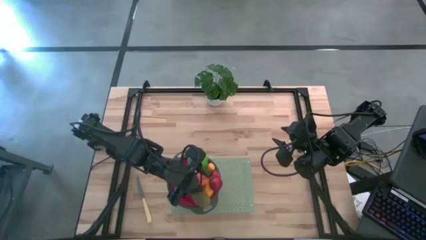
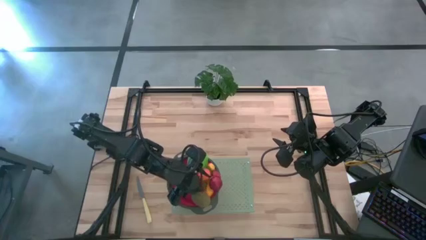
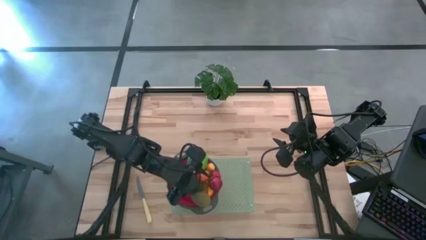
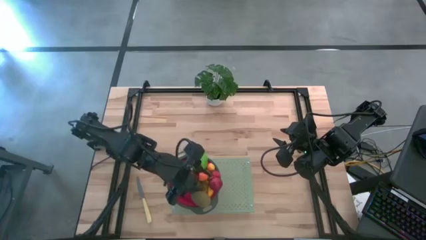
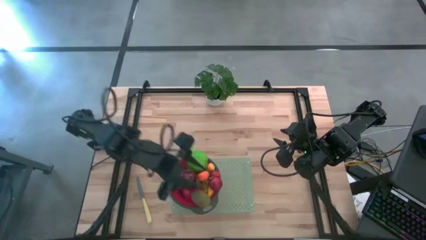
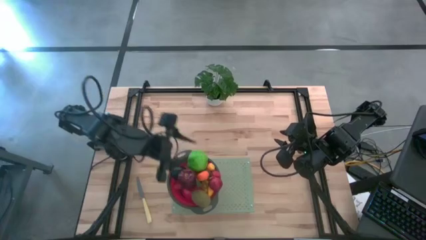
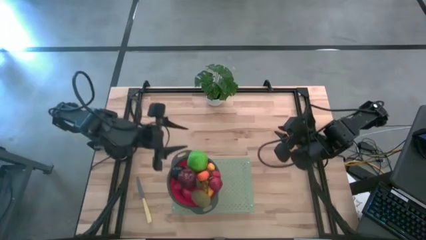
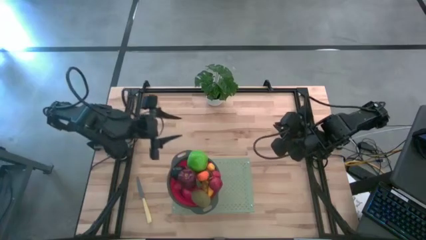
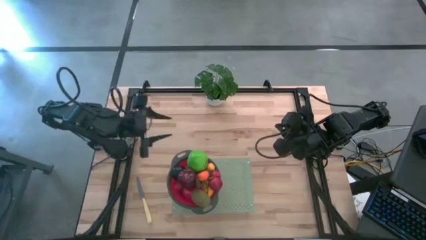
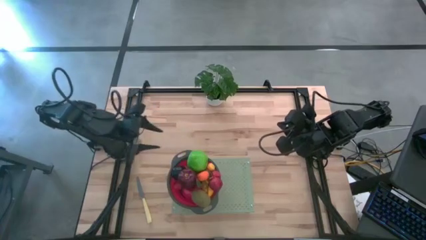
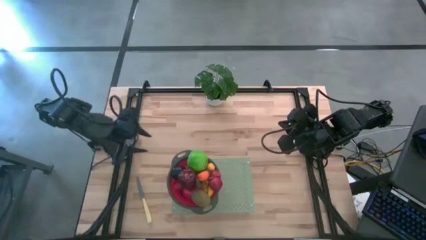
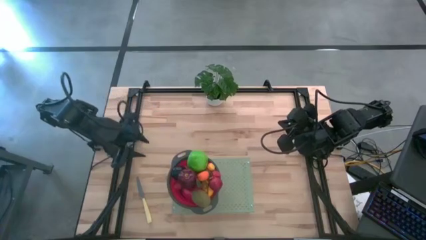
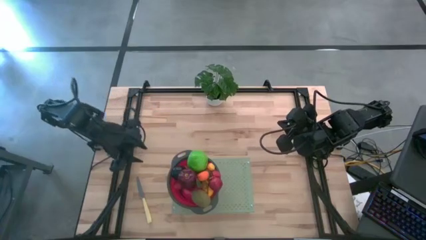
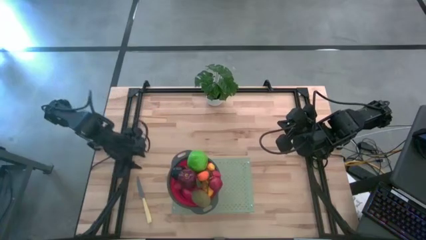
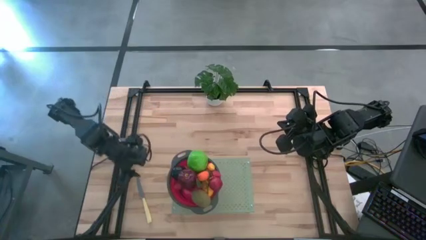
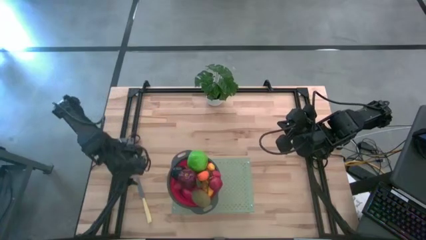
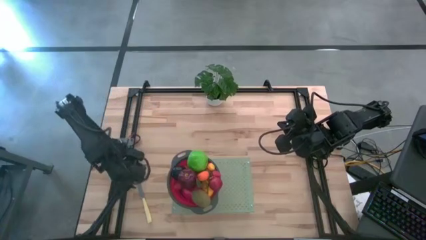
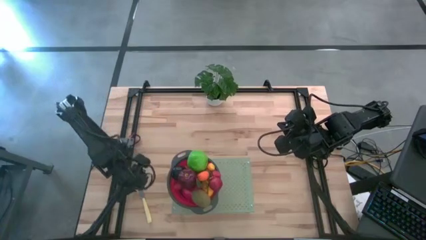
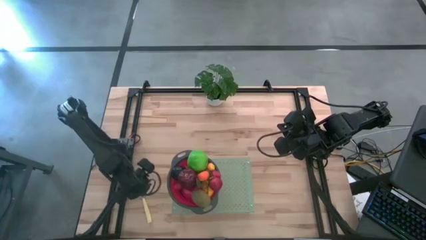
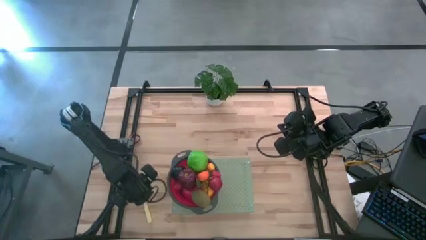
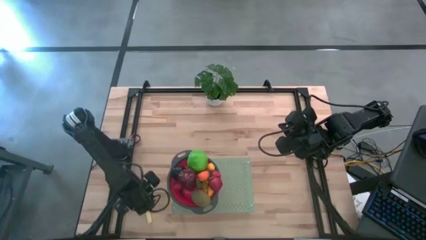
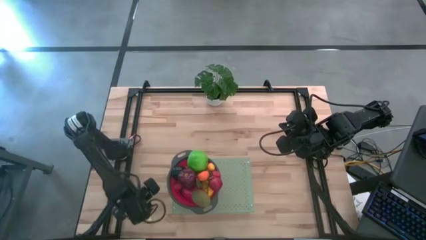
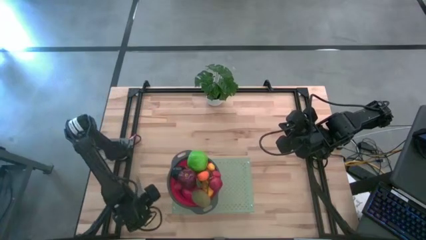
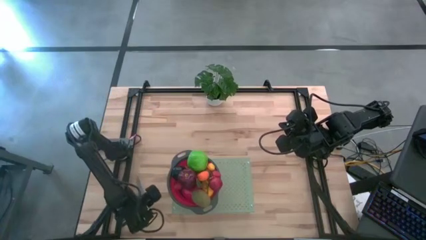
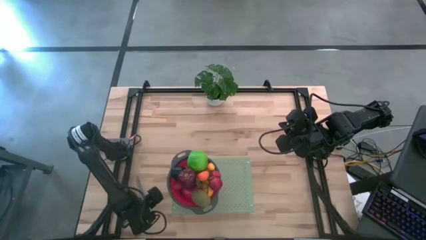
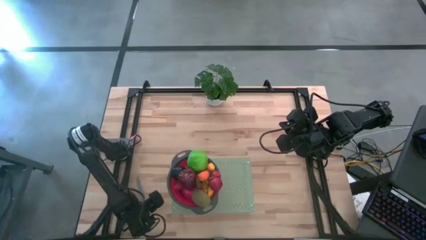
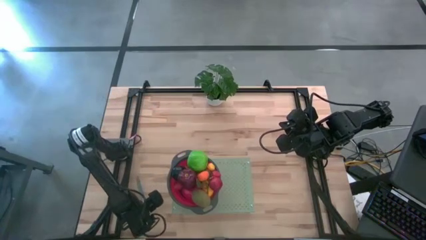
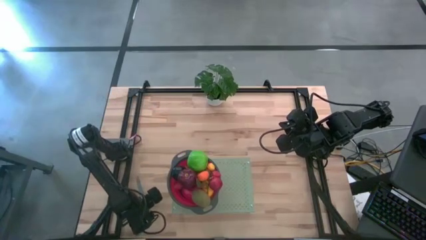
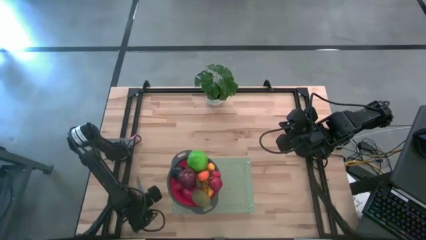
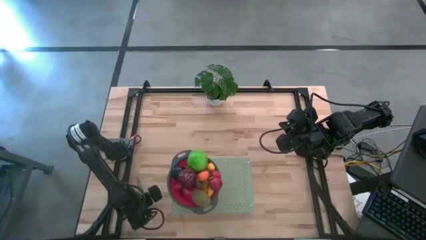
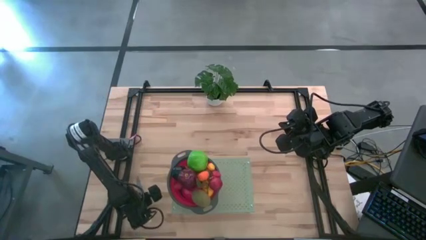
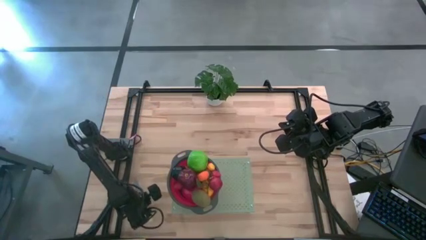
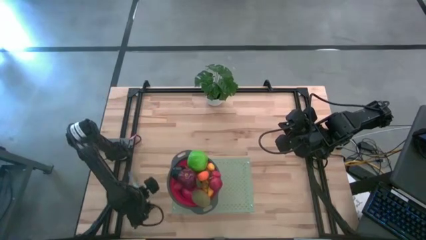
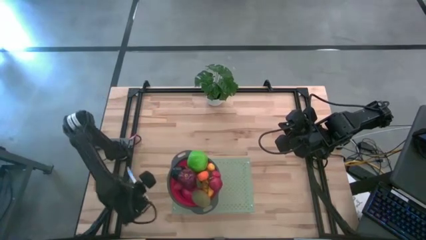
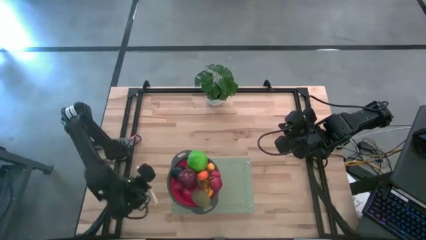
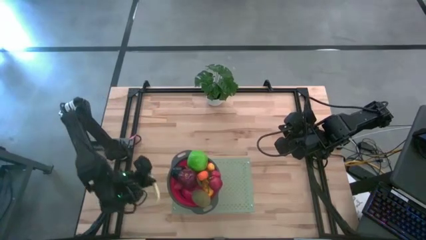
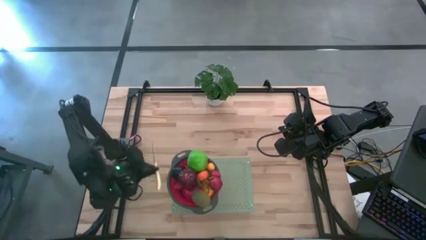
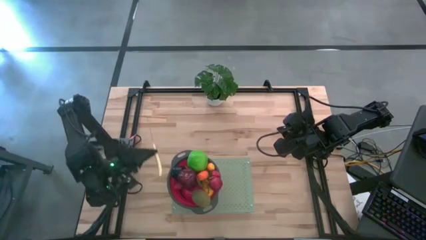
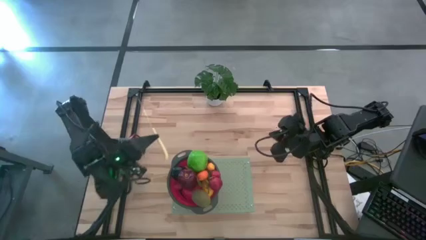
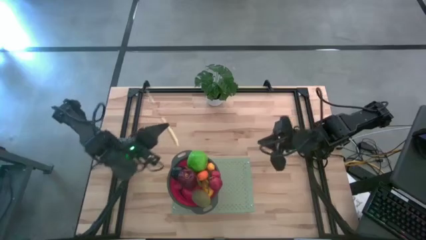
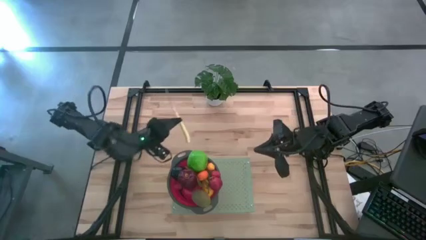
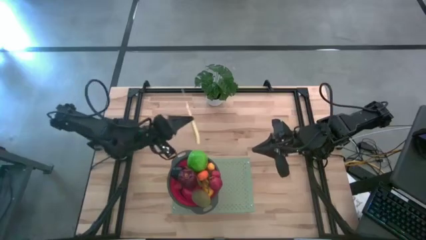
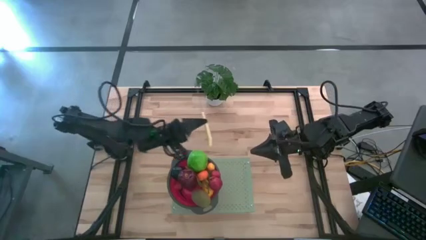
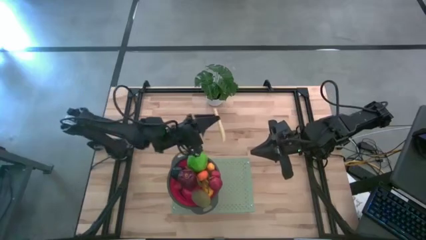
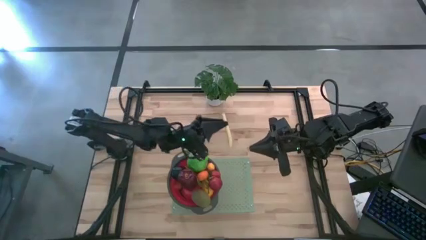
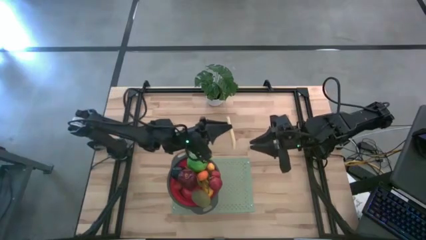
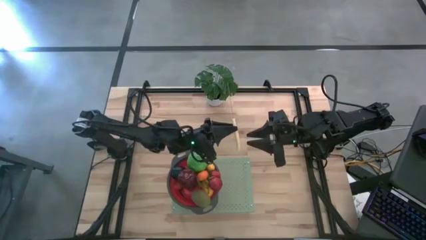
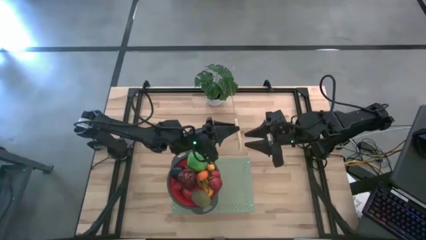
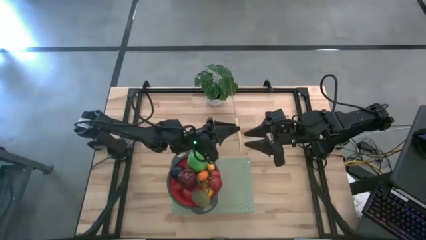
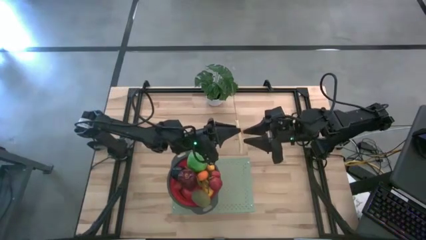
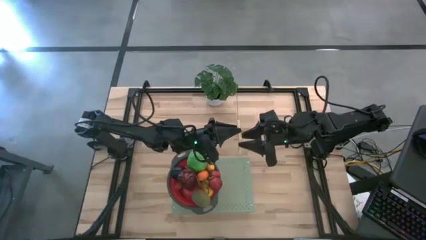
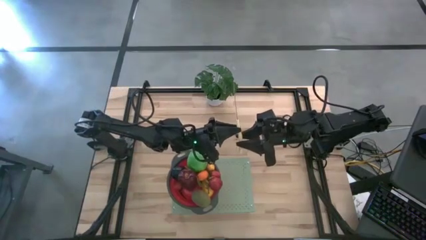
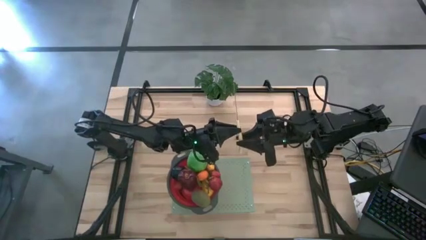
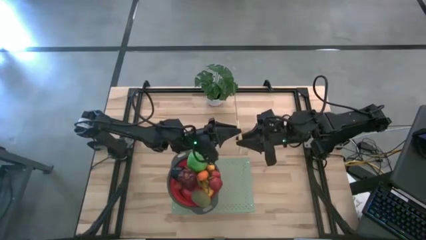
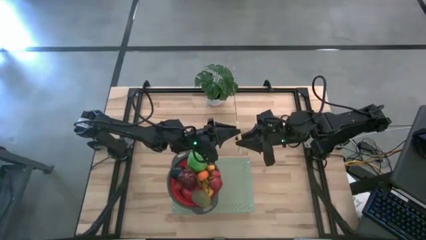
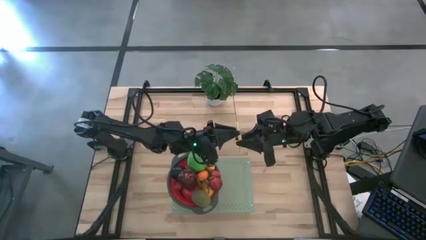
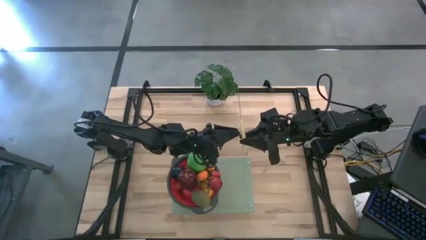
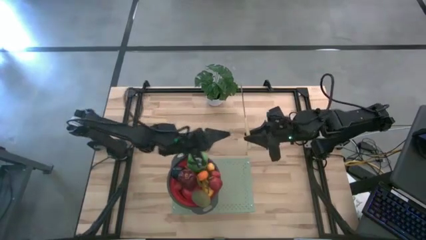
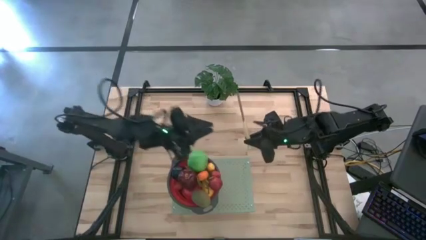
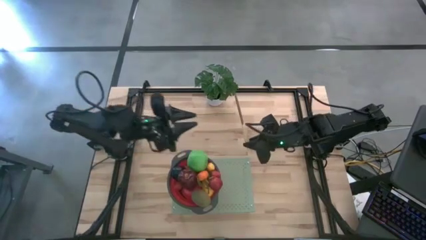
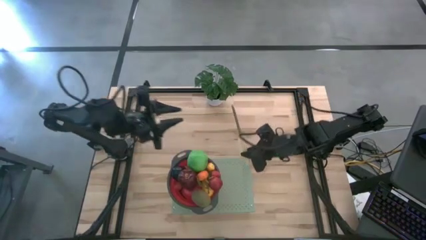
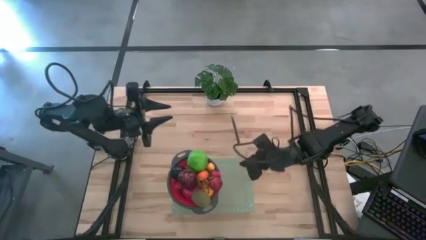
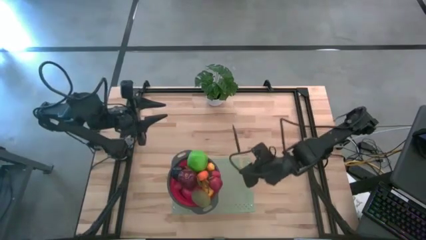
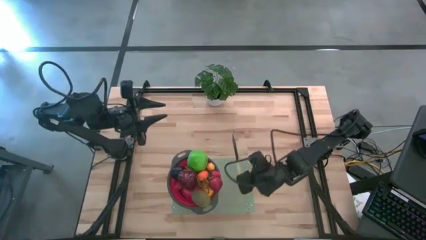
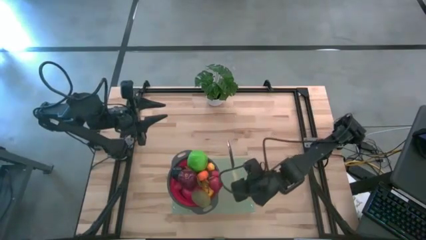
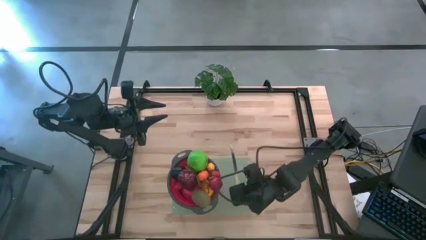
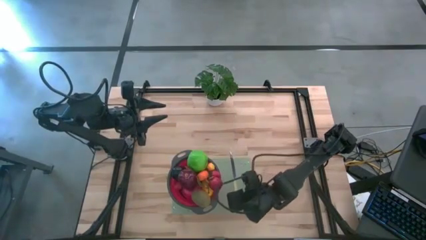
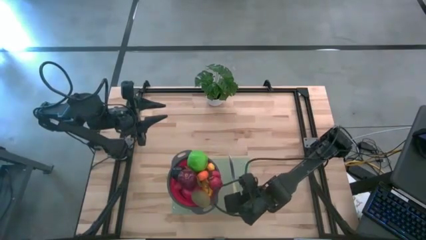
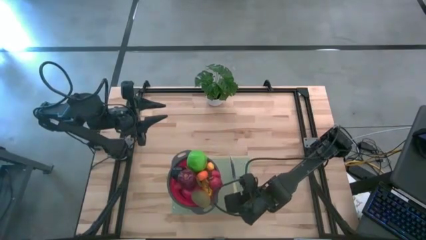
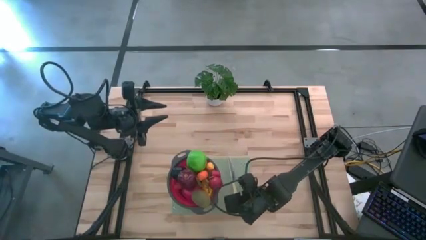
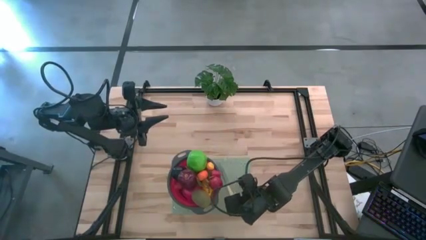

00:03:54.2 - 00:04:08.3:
Task: Pick & Place Fruit
Put the yellow knife on the shelf
